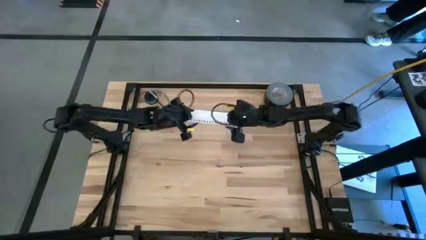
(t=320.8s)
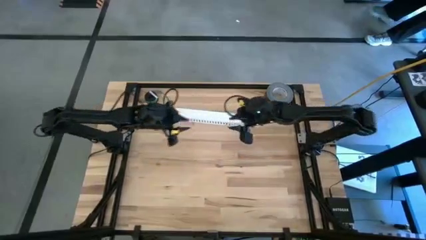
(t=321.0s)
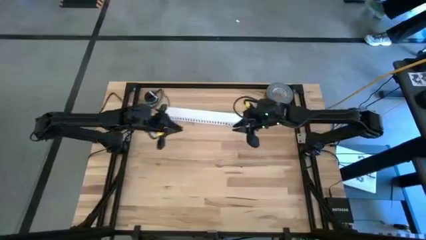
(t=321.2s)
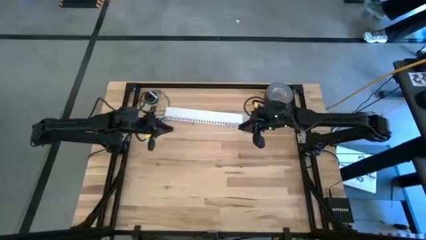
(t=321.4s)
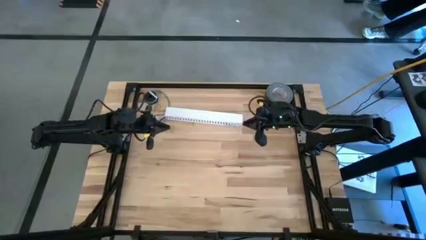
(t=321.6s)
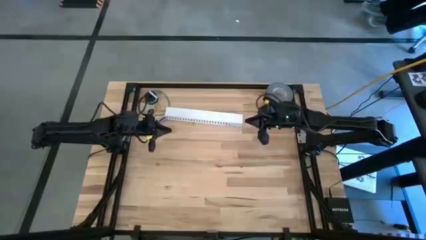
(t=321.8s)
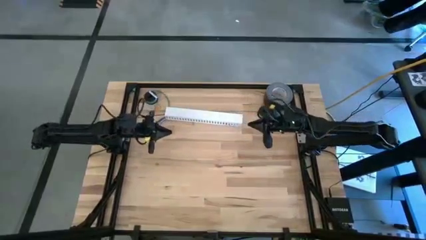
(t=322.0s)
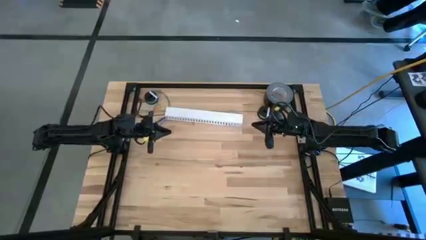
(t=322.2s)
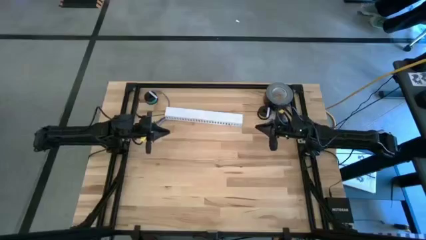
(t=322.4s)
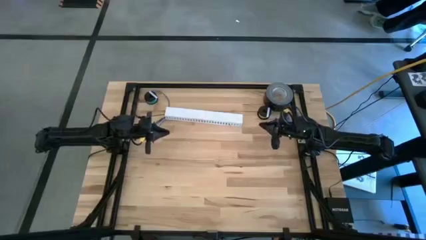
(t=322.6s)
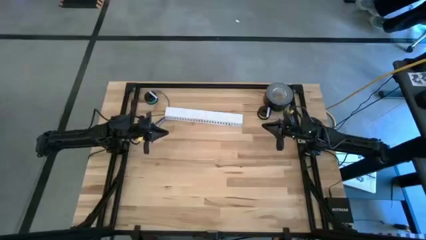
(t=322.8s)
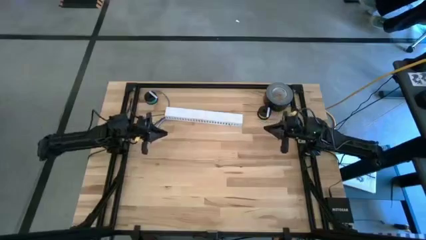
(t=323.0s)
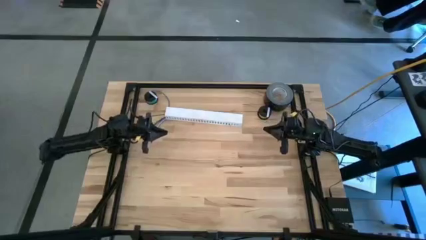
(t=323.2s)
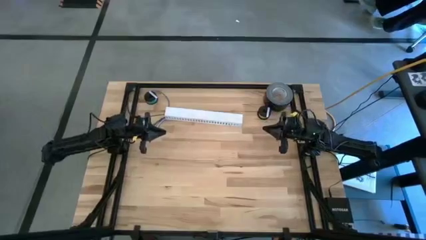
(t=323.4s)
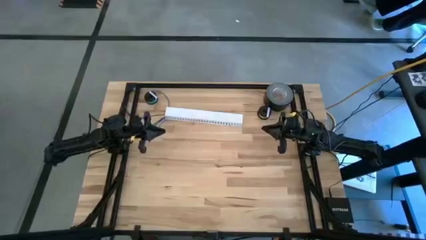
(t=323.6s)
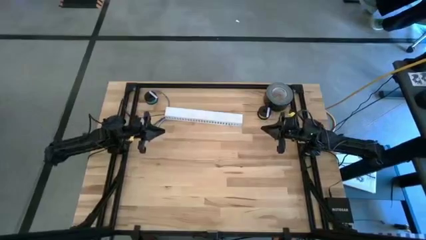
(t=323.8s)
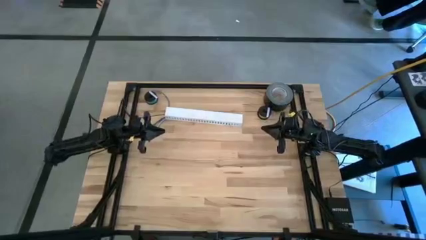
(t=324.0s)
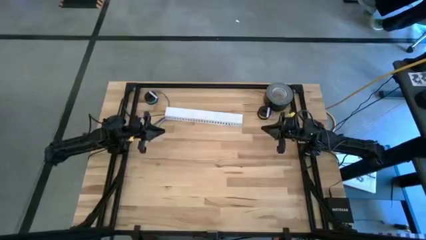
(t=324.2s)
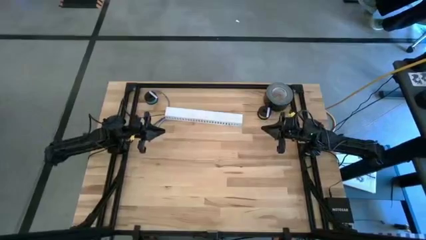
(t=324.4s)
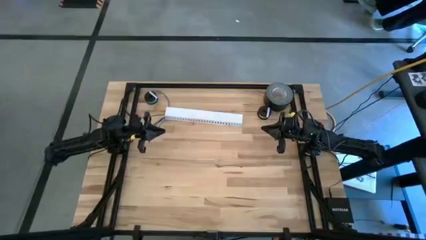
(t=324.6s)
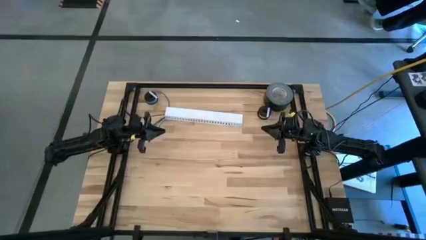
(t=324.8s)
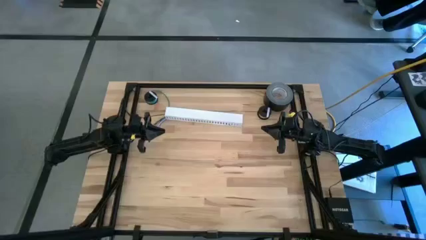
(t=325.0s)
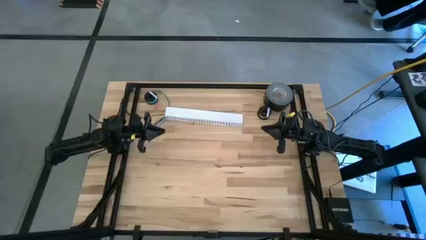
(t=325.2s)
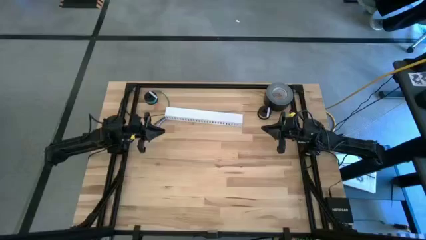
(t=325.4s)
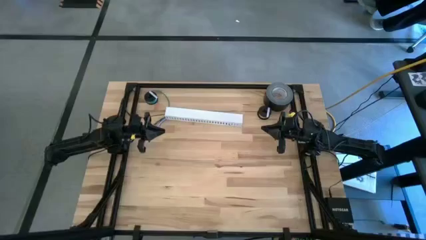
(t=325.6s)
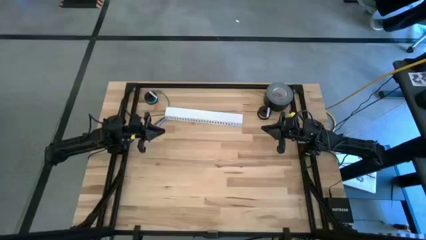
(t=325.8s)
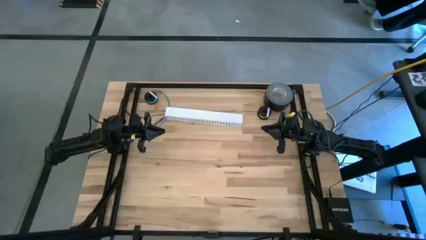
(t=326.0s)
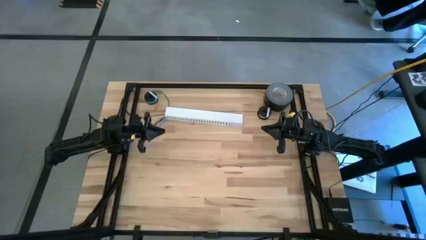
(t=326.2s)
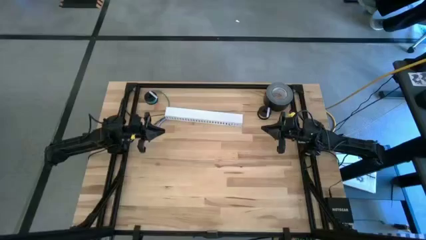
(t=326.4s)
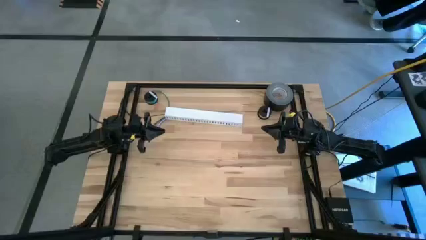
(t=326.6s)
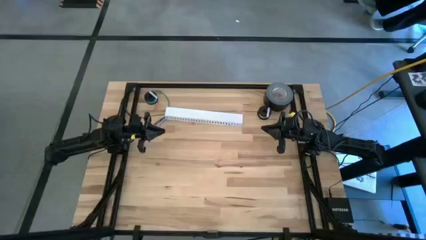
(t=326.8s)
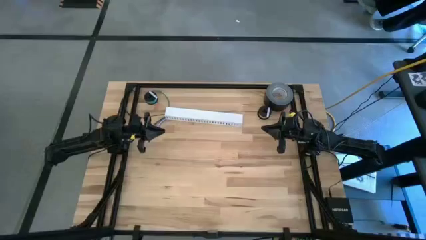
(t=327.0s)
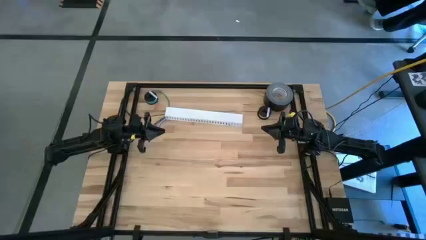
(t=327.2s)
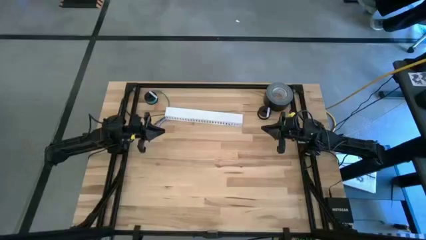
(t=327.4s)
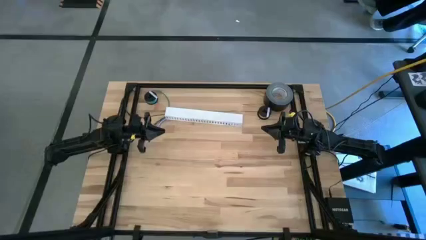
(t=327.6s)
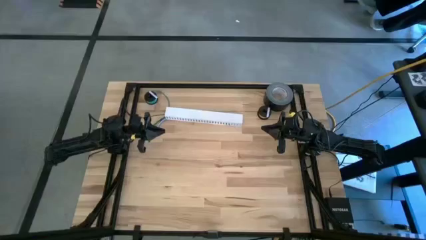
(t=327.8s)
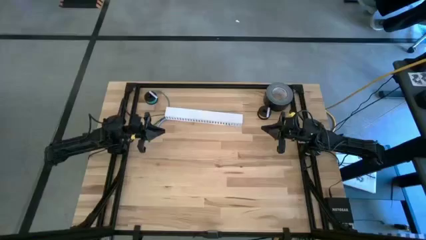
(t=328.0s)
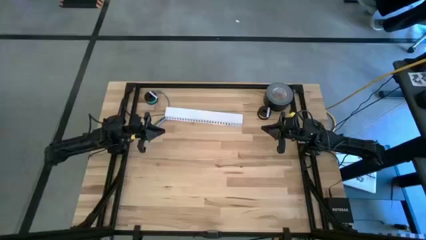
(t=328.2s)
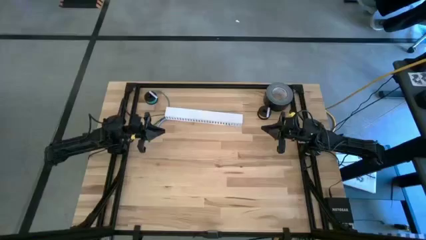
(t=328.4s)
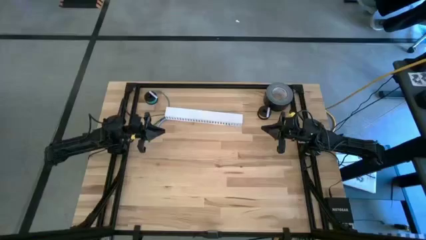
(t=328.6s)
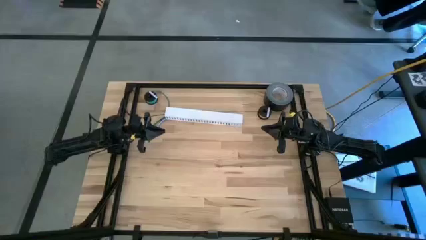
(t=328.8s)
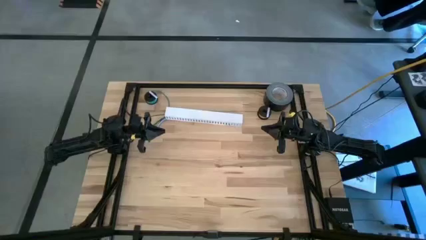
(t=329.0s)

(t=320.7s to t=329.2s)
Task: Ziptie cables
Return to Home Position

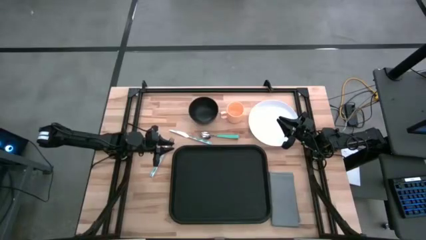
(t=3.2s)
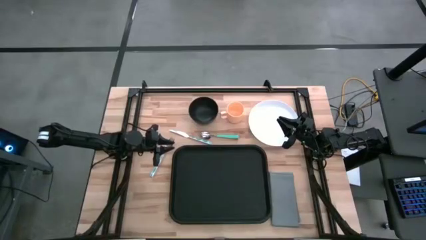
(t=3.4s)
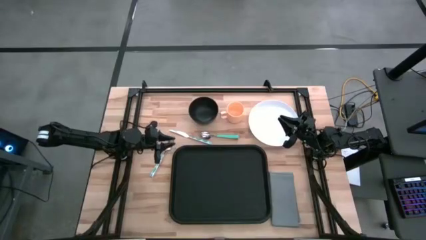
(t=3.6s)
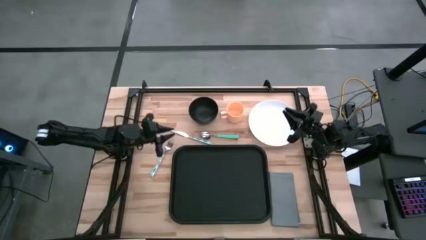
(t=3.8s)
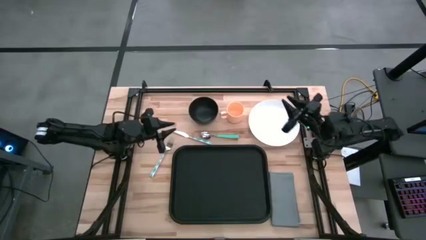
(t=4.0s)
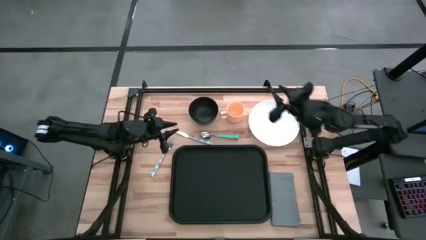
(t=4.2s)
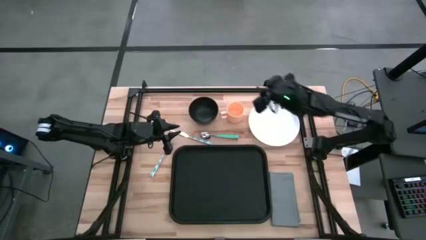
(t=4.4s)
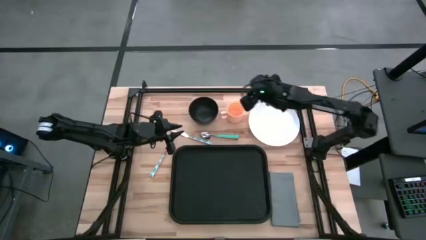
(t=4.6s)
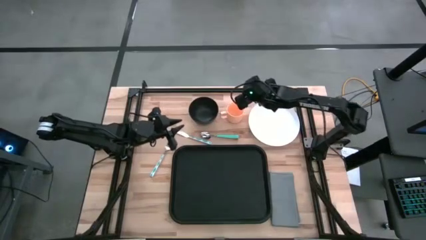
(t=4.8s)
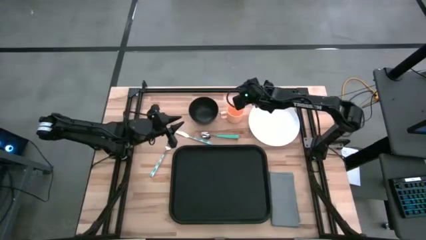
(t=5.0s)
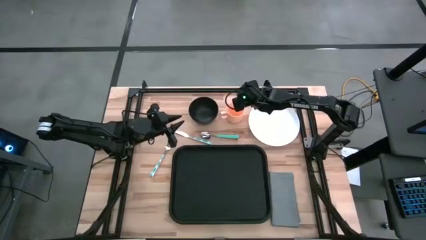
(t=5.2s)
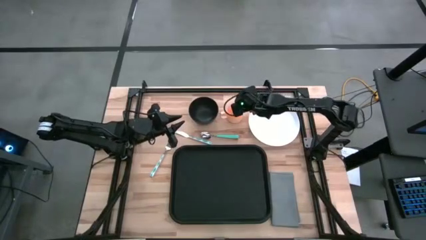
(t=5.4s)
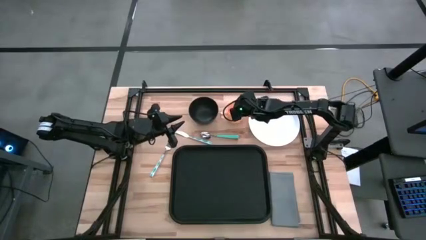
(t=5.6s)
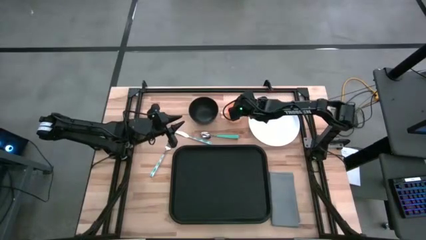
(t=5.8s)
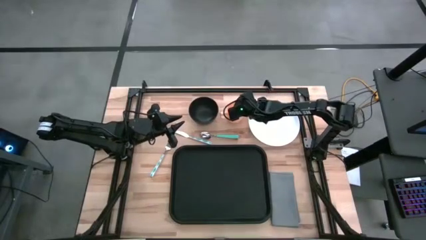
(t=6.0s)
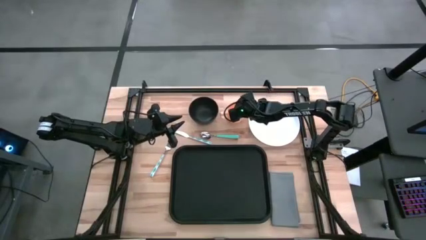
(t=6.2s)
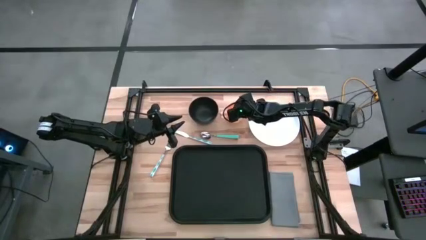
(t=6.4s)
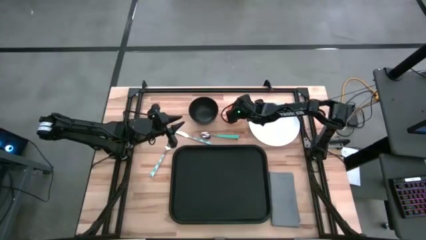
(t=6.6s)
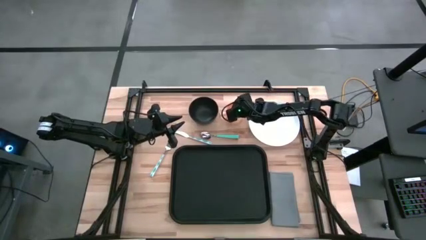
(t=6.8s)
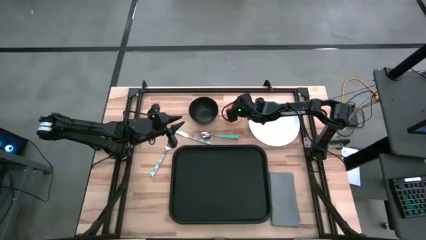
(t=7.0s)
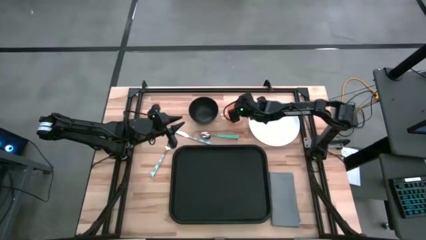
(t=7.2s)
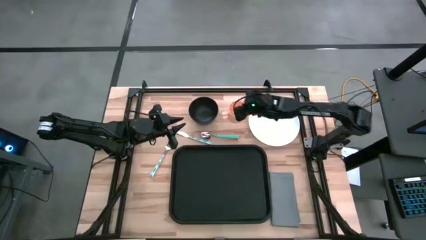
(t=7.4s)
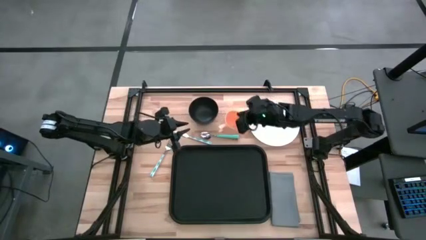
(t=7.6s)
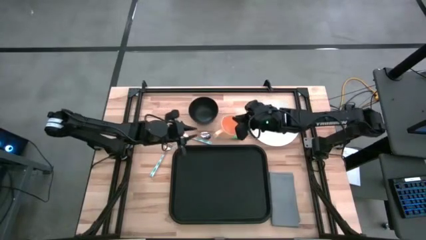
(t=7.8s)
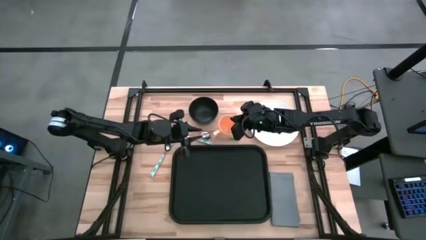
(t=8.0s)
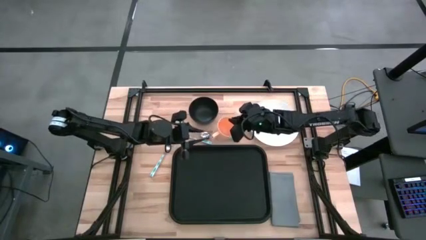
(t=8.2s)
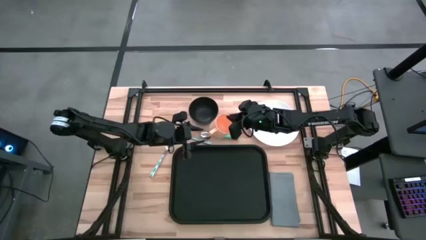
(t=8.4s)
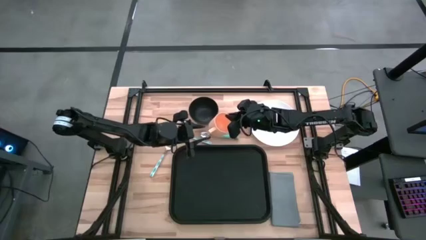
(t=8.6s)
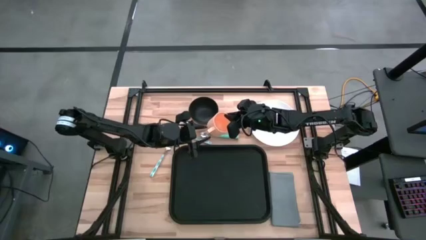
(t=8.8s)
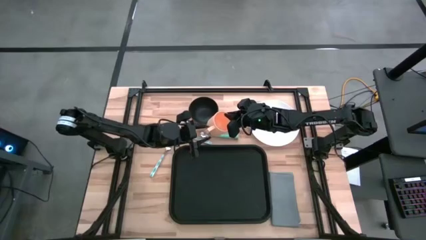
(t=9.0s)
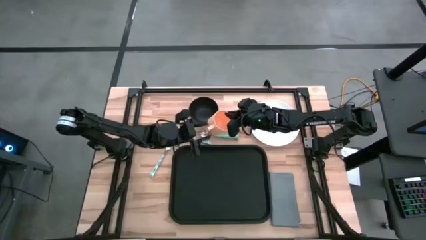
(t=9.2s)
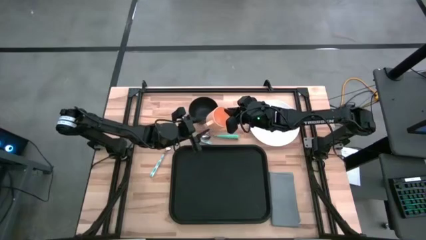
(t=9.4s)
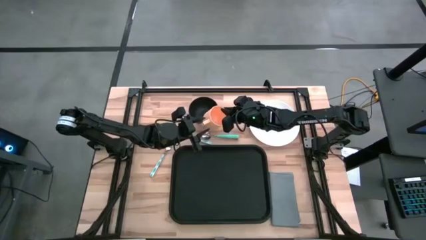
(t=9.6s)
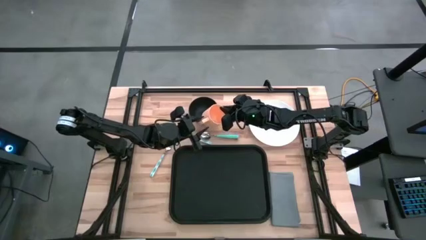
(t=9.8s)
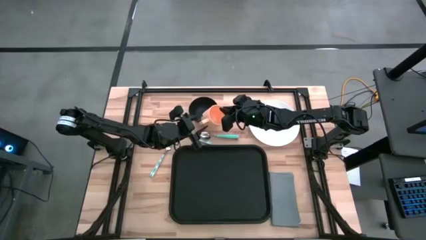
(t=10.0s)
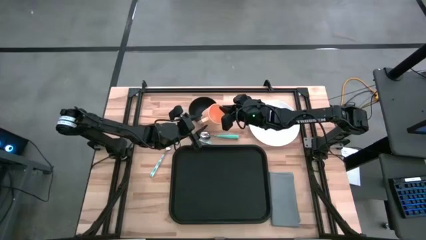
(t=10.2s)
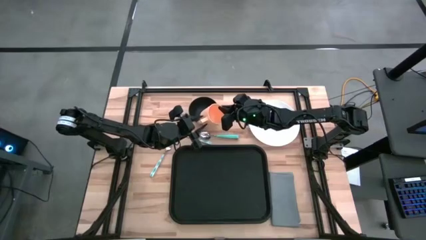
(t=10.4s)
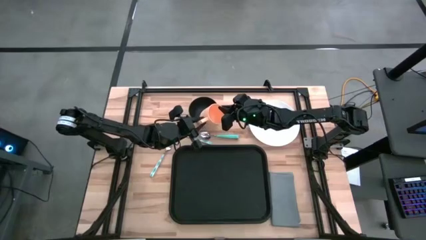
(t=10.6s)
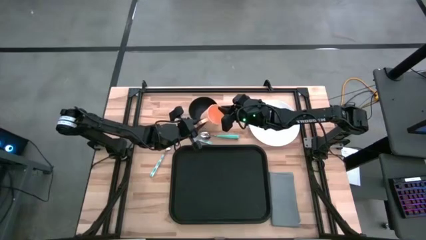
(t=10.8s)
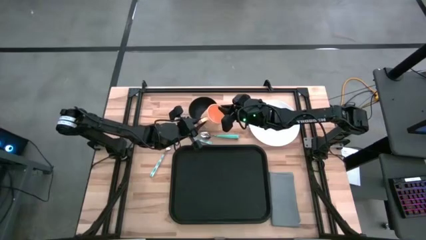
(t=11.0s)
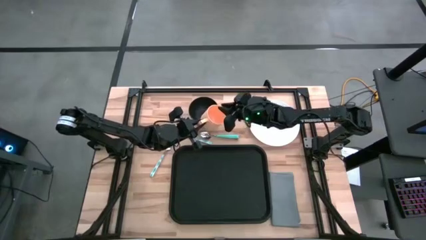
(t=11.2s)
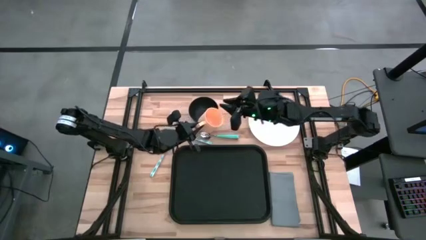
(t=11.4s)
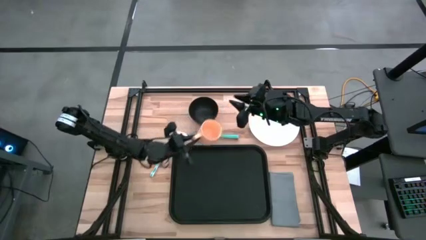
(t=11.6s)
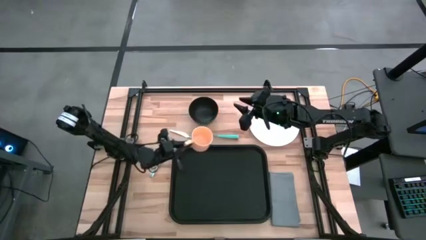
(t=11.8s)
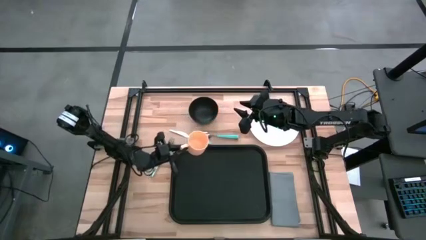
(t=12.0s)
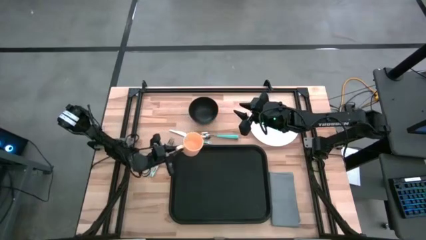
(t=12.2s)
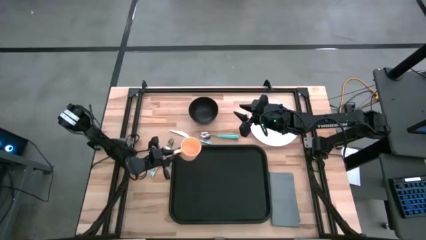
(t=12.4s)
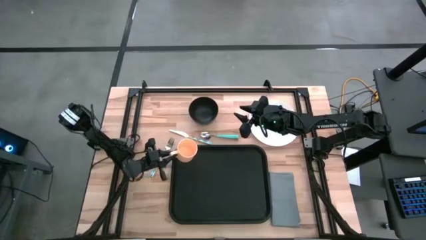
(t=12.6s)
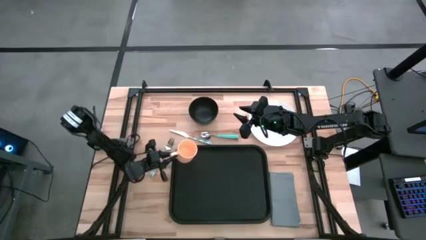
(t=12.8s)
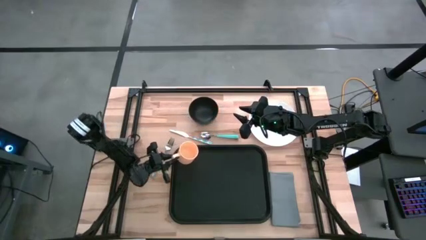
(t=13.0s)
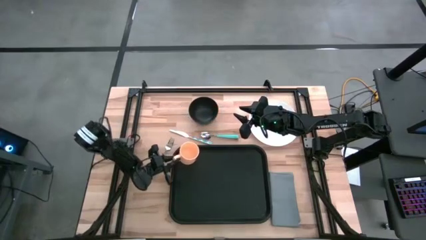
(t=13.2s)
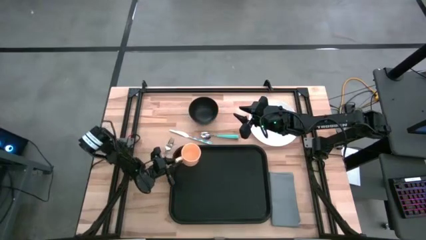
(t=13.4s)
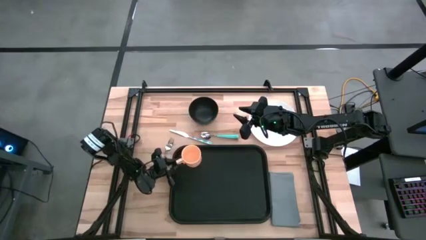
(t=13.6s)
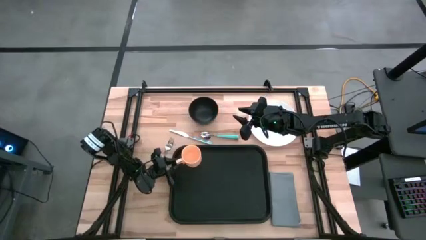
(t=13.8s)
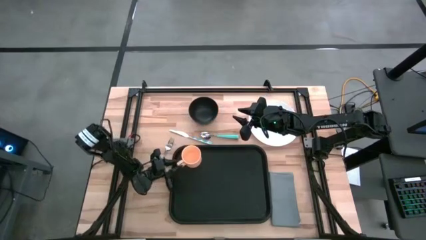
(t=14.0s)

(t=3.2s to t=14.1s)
Task: Set up tray
Put the yellow mug on the top left corner of the black tray
